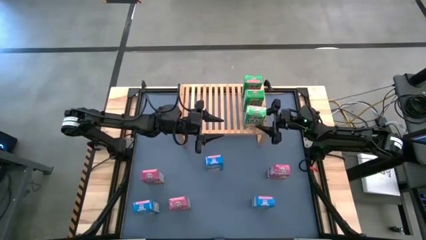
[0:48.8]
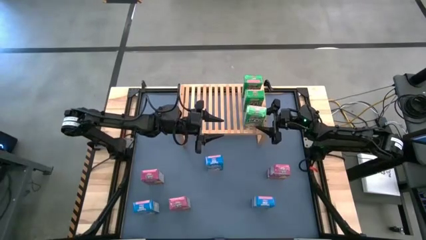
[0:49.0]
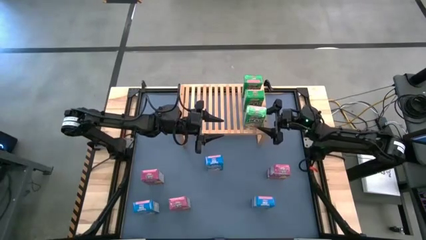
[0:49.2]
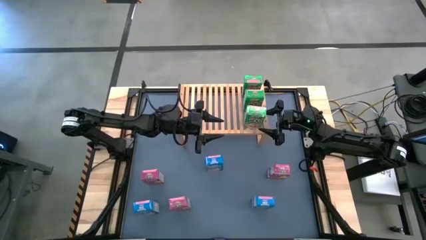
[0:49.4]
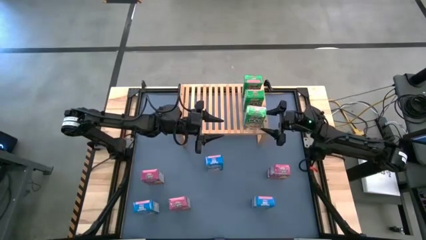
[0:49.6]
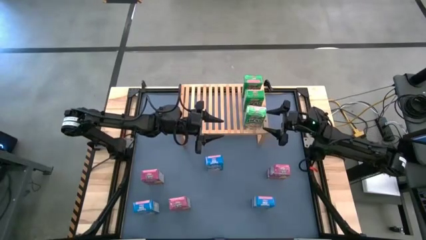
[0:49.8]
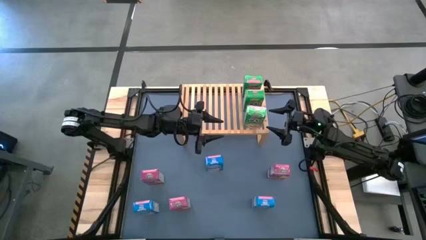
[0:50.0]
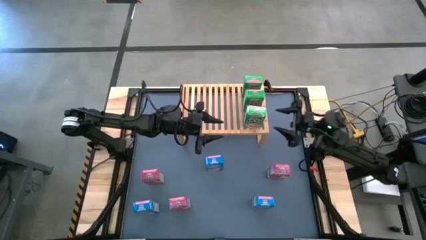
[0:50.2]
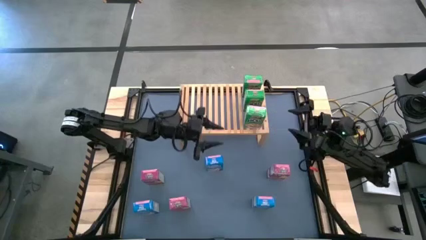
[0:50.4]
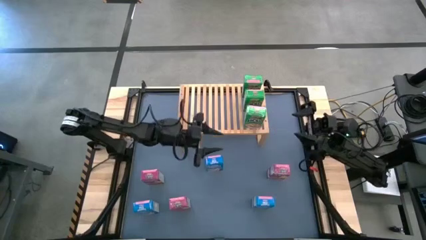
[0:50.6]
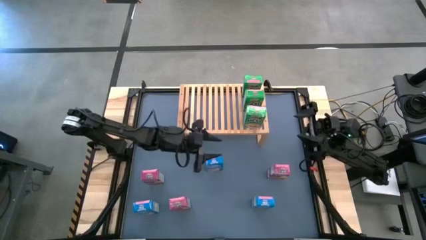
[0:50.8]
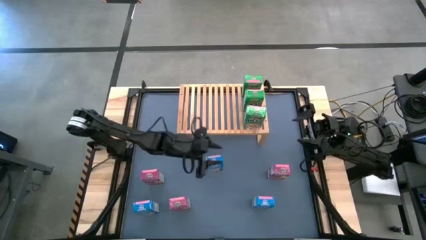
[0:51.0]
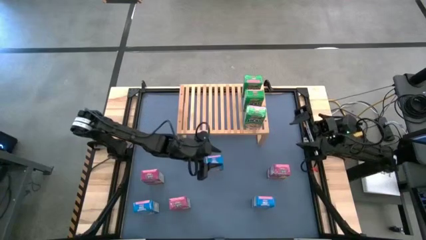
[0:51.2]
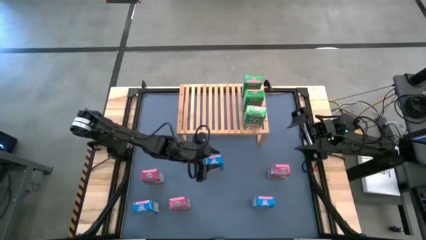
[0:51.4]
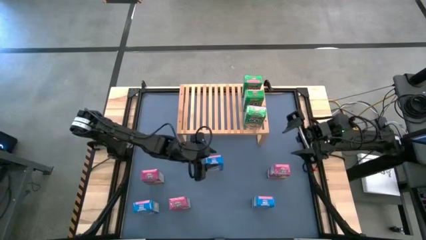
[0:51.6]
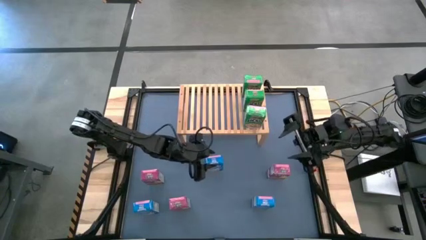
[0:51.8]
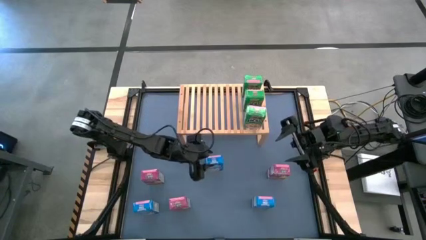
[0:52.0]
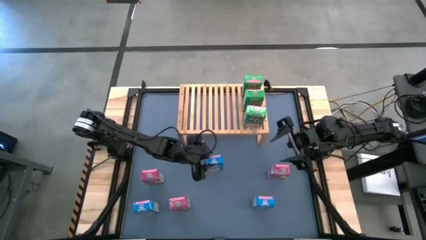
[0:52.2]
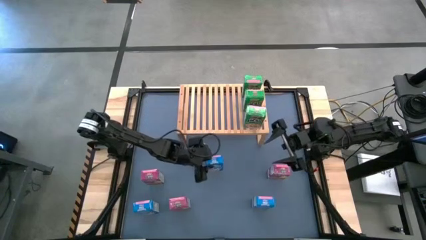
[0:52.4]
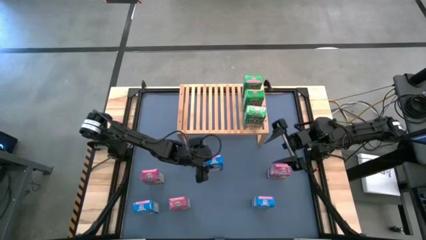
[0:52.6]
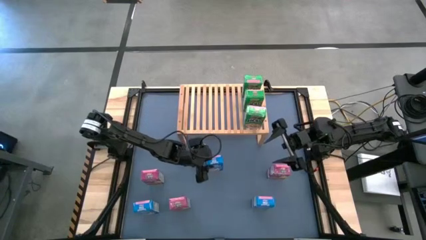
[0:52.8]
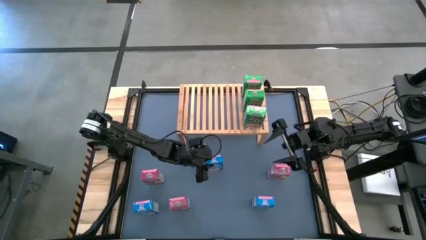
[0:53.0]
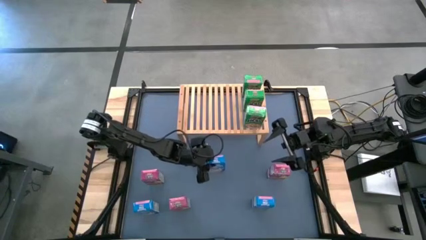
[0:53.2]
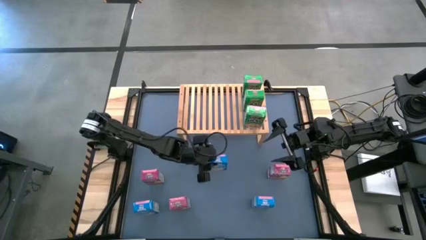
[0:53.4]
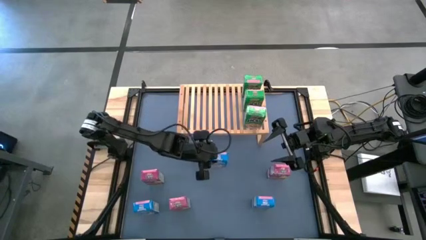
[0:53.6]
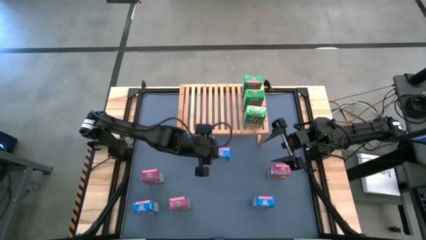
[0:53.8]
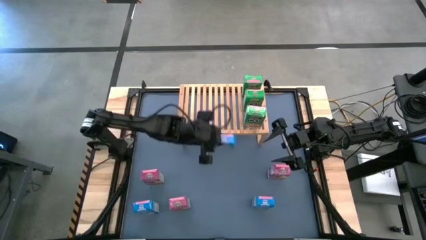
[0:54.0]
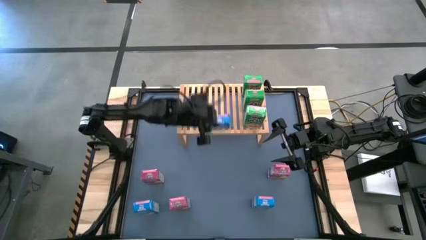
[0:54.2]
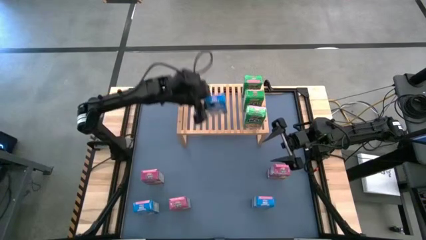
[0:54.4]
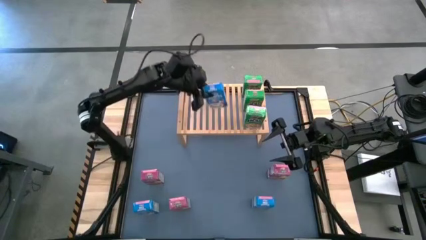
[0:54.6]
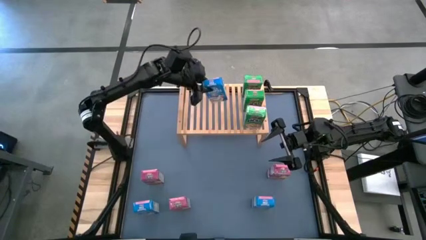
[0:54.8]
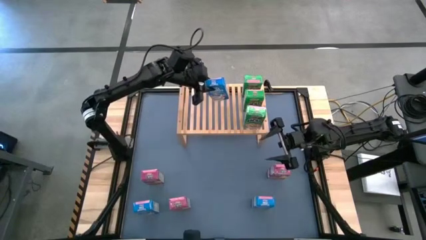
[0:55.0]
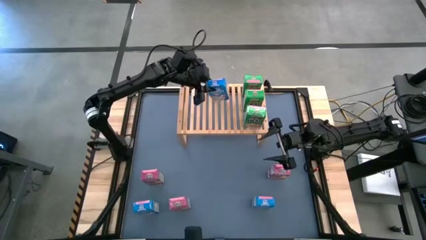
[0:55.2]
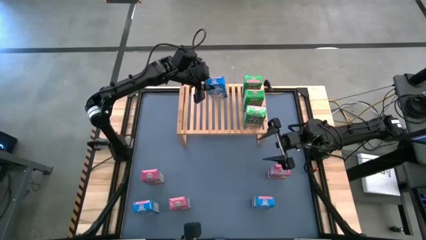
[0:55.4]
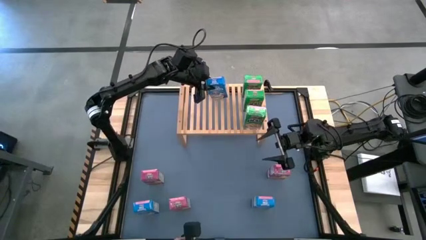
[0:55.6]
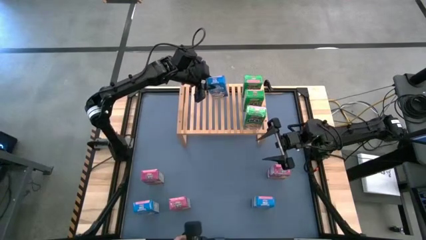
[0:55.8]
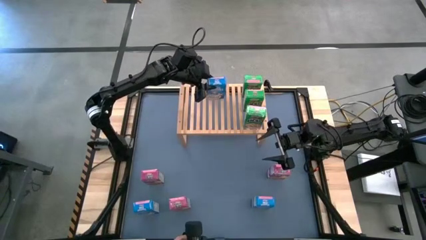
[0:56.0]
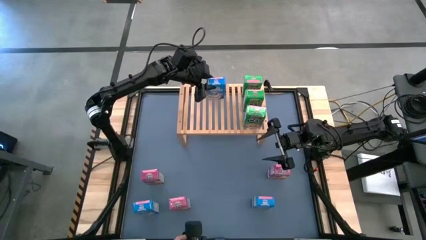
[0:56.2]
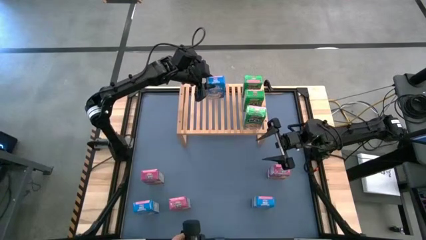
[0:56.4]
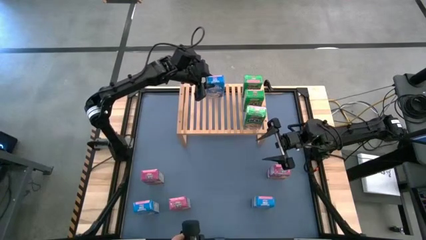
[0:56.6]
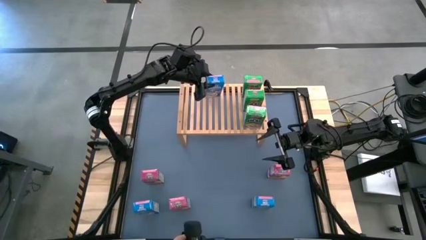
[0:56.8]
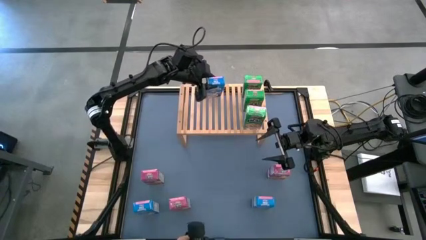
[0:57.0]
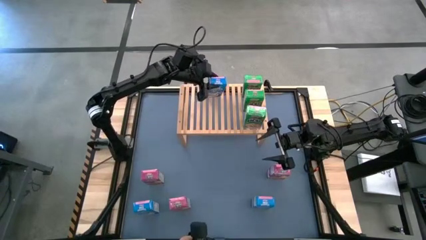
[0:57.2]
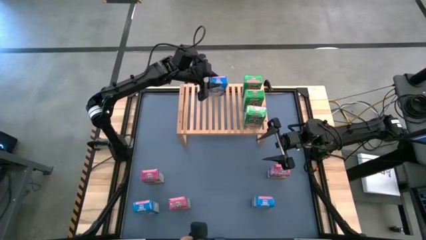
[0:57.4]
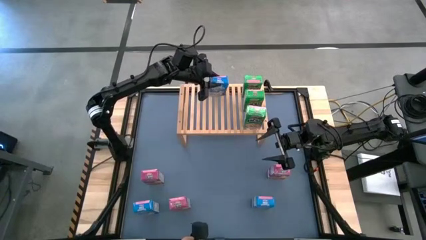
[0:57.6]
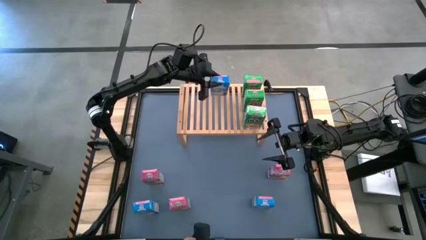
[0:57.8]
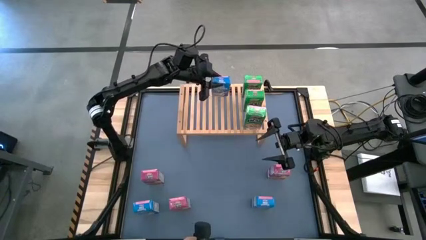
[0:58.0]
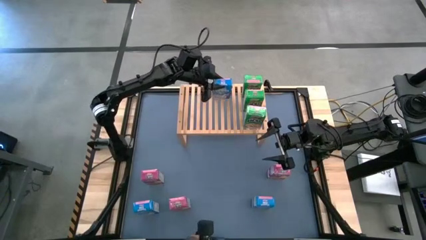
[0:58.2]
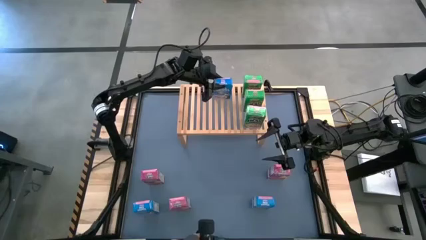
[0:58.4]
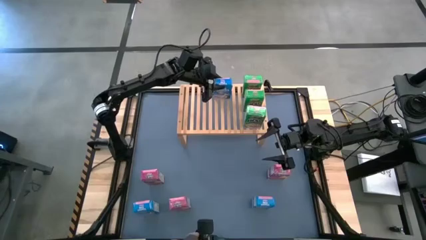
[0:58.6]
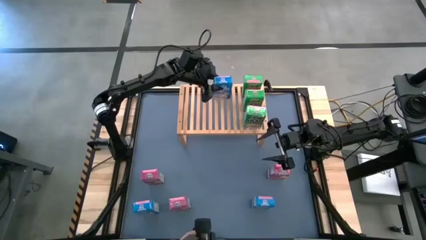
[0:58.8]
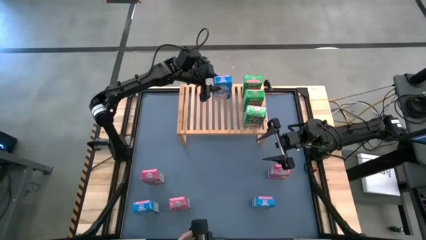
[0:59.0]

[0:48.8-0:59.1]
Task: Stack cereal on shelf
Put the top blue cereal box on the shelf
